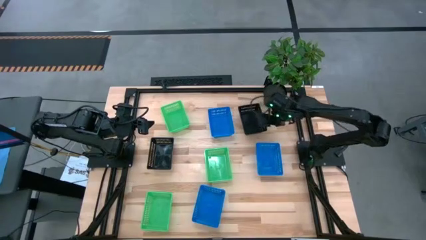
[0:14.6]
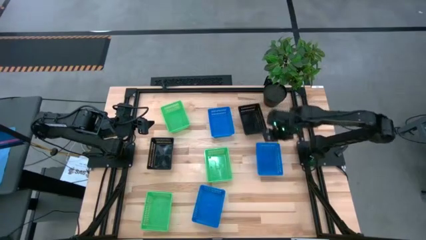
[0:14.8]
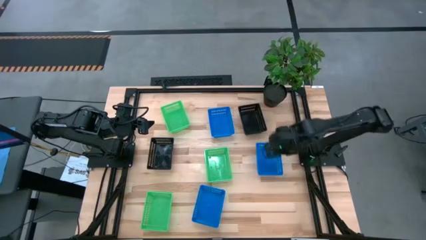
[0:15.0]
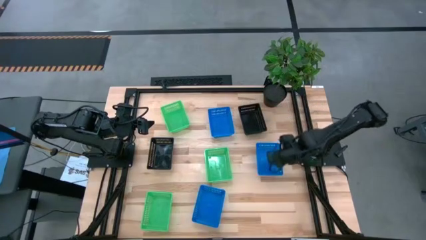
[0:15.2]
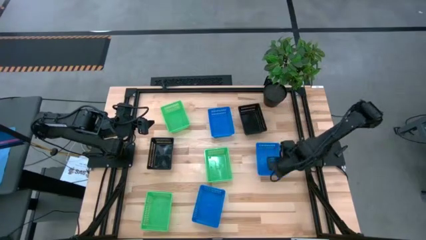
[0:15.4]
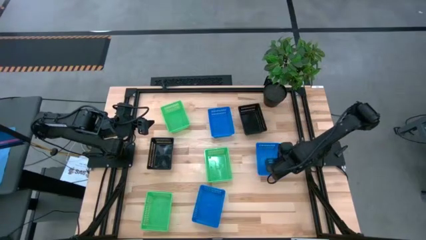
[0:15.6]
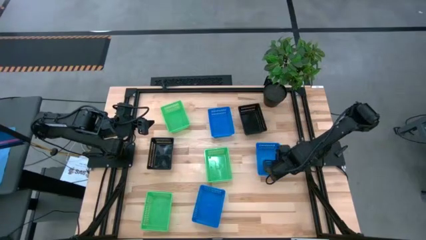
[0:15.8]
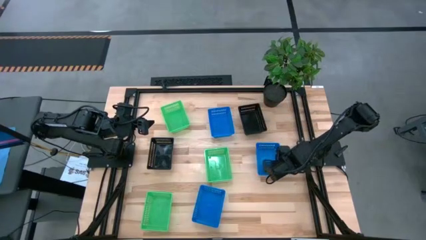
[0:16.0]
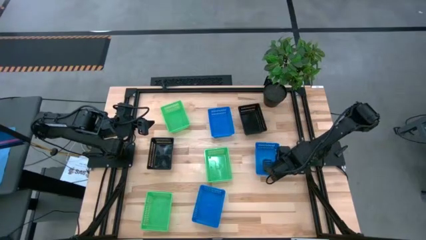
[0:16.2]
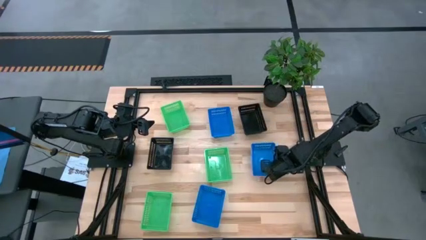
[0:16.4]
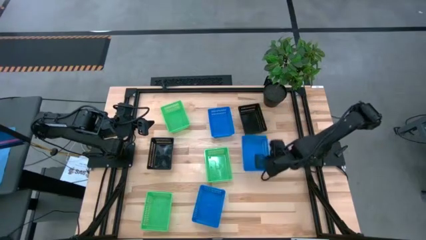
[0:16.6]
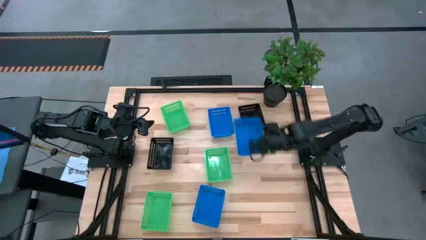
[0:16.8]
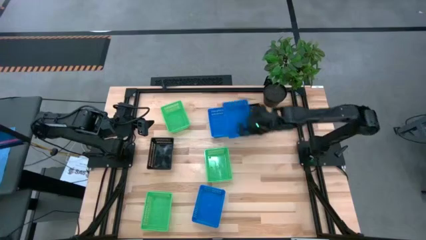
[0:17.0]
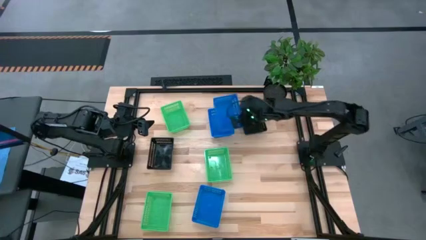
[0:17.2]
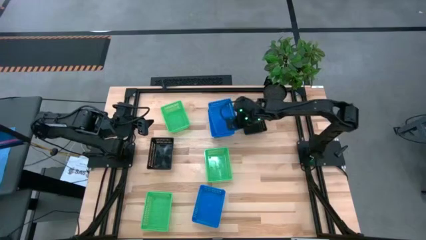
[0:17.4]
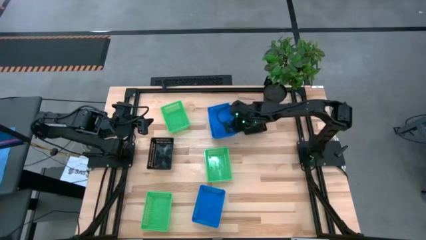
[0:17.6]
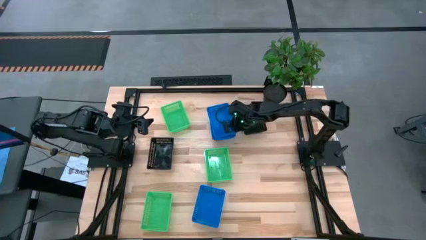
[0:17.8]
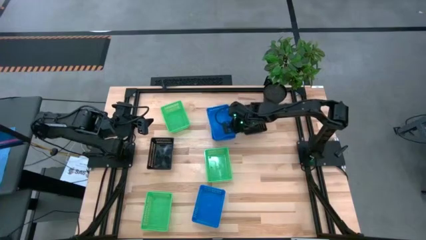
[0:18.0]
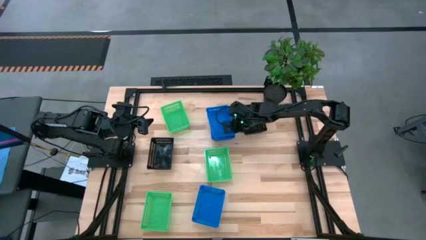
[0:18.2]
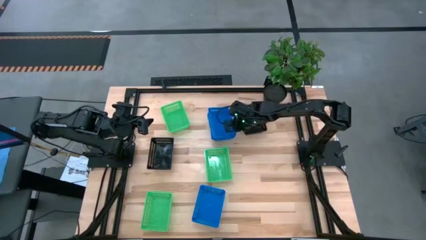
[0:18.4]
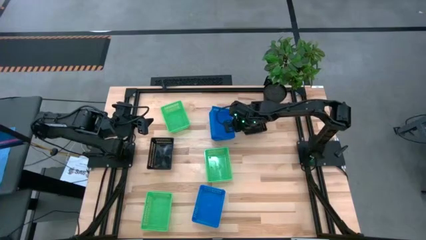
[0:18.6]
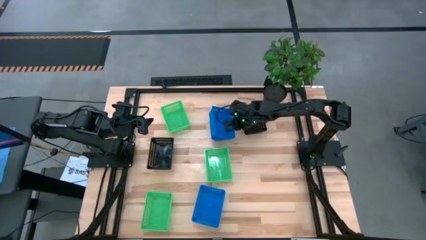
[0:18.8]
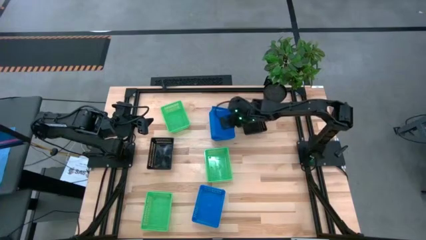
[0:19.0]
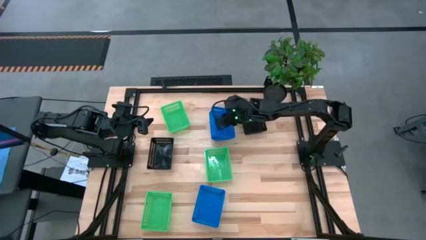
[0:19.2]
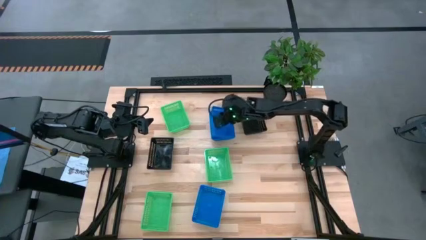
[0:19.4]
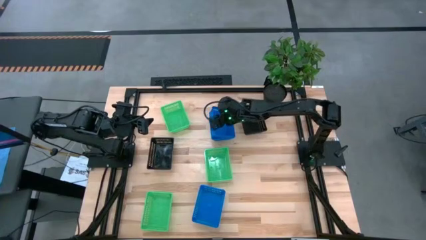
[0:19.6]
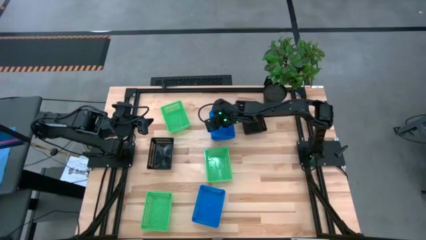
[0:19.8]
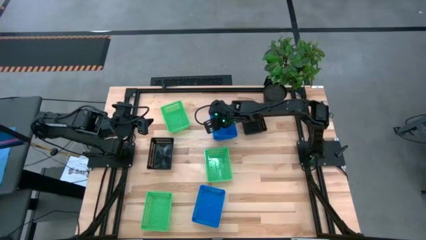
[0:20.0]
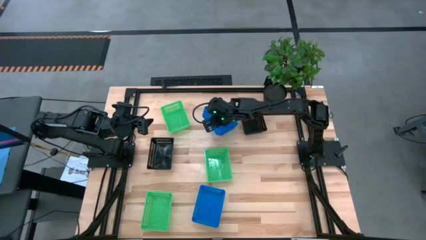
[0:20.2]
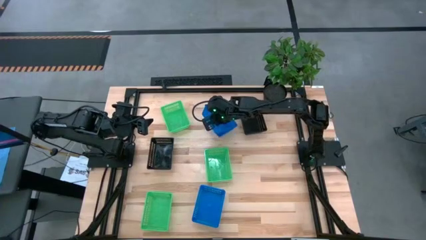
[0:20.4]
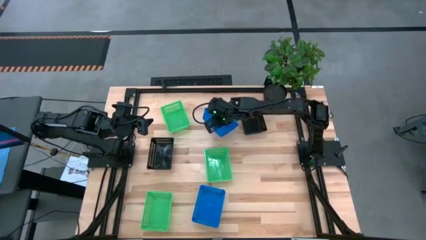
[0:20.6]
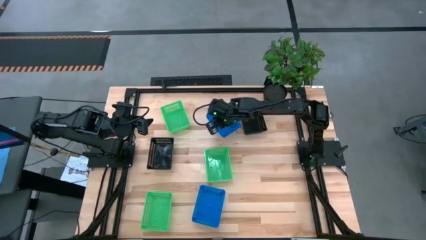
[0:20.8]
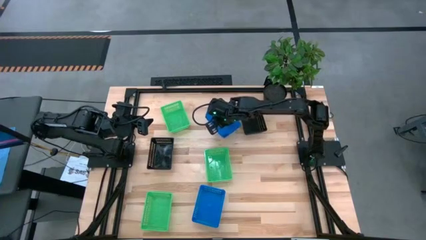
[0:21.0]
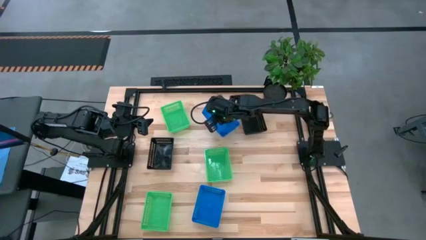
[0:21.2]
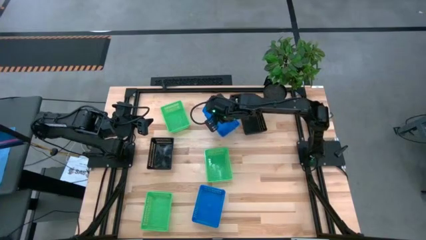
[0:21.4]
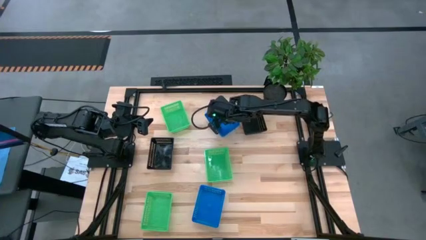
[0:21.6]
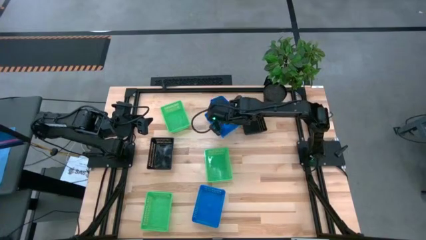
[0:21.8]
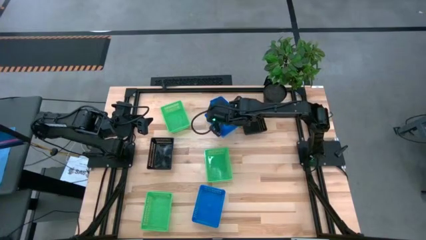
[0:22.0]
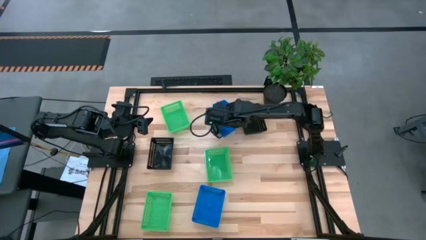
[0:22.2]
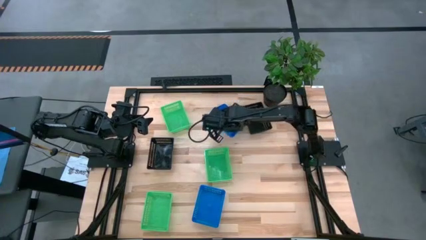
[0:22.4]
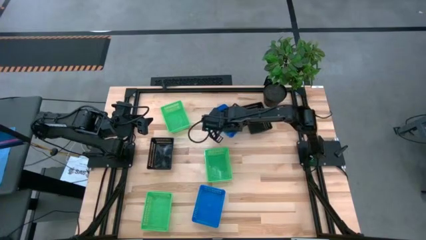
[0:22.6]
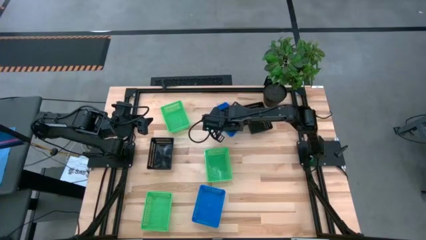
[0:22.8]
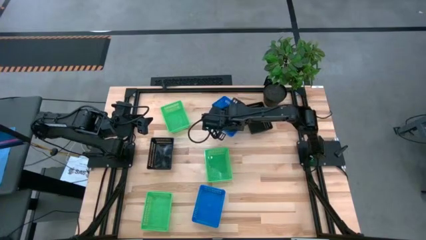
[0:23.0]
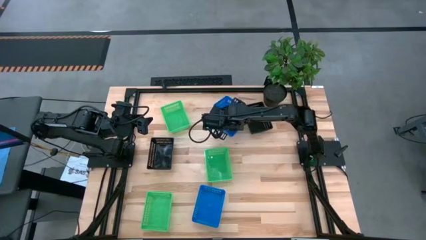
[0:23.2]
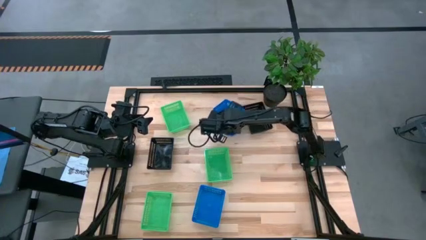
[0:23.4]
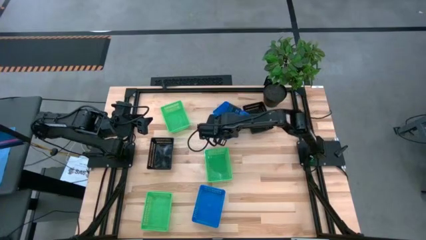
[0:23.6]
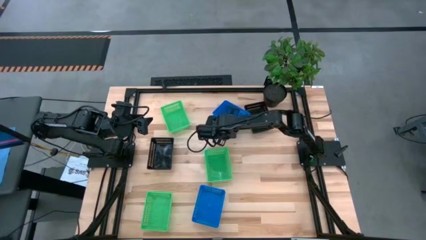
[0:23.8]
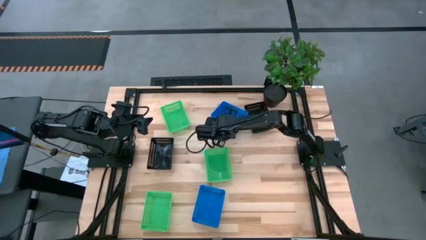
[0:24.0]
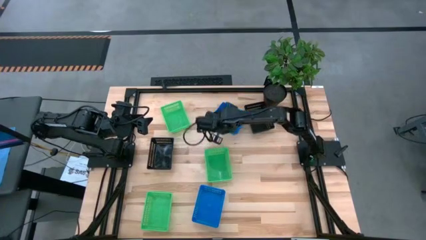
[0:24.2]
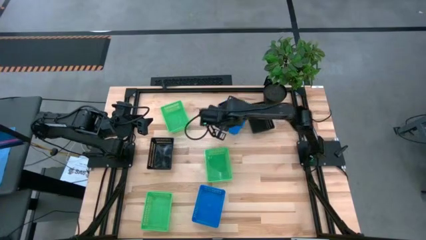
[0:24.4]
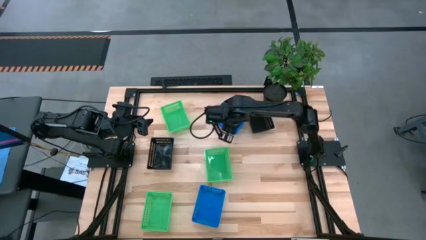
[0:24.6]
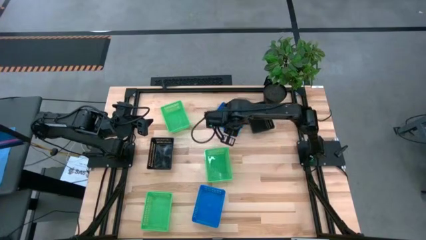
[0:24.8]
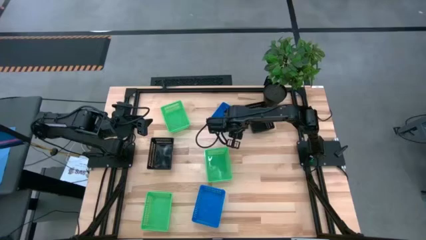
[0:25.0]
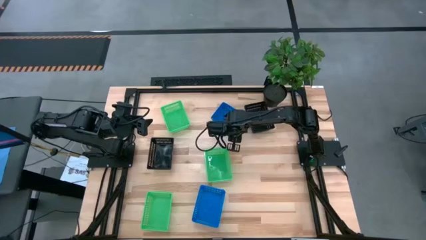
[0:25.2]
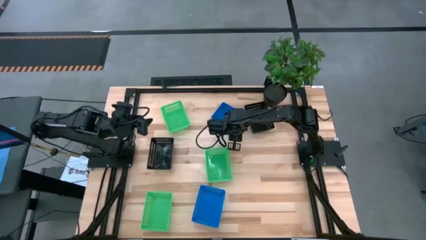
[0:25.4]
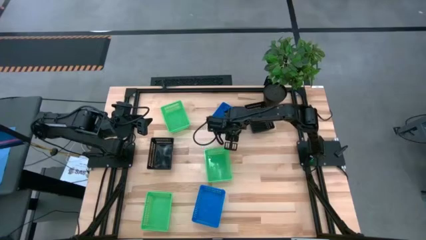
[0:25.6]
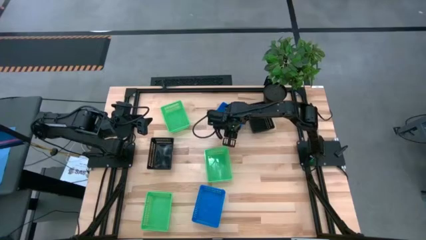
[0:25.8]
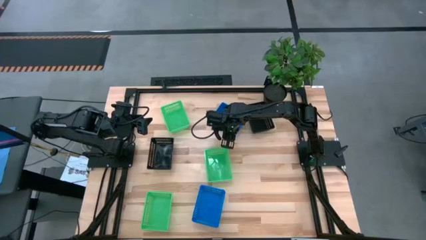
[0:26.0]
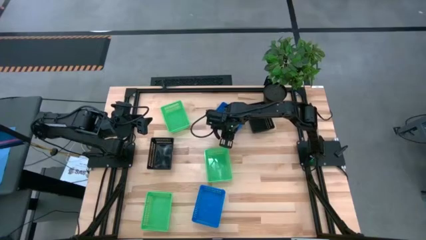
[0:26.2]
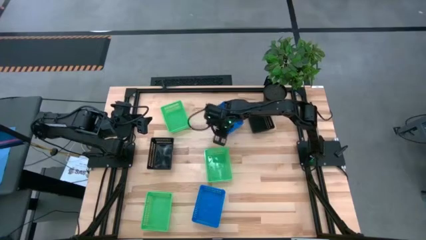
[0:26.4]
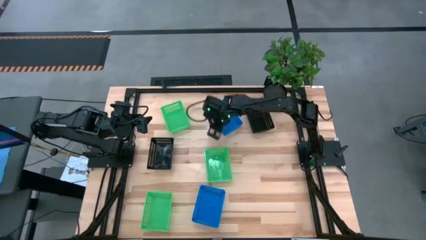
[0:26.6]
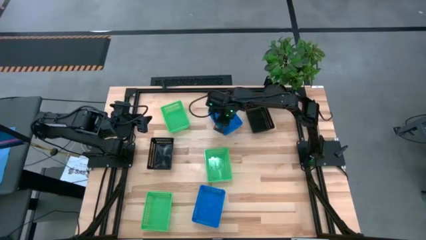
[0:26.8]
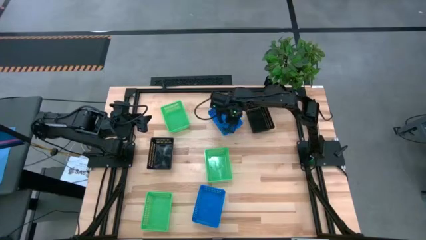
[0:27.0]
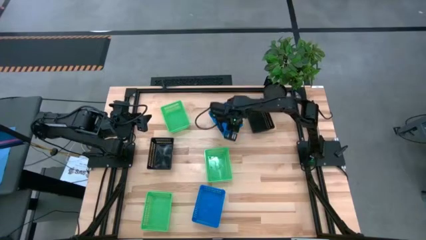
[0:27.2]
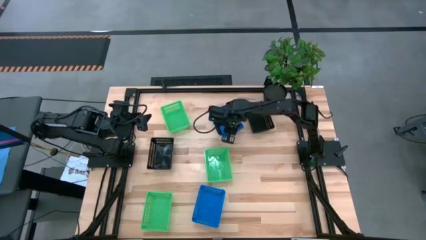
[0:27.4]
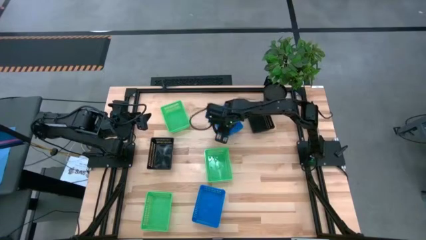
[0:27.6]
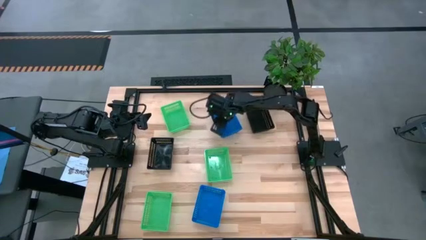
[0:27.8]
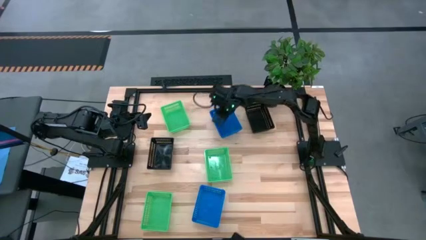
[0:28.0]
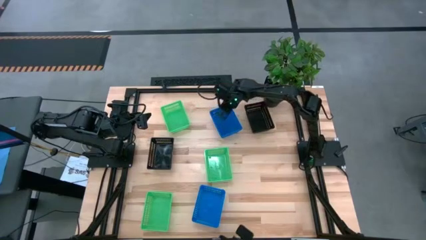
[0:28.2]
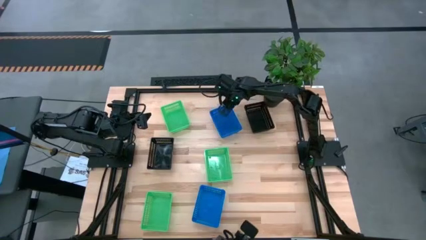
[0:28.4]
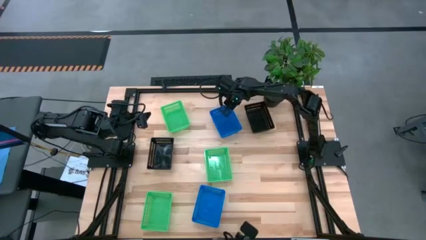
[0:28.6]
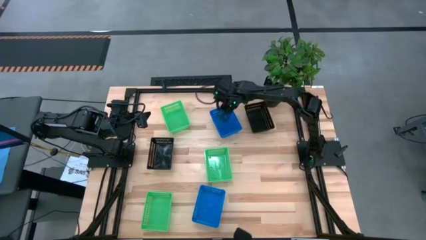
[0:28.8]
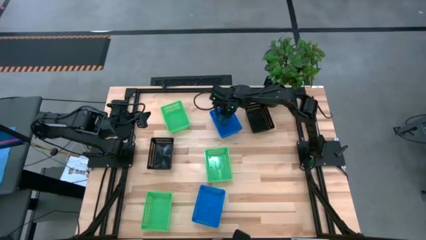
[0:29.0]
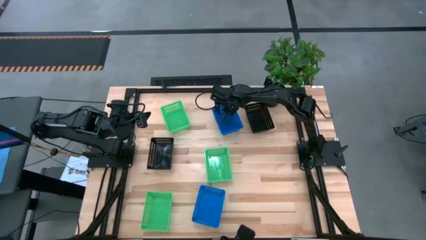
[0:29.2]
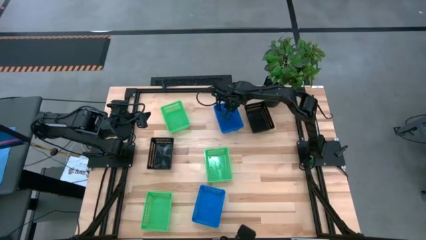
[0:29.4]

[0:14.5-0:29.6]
Stack the middle blue bin on top of the top blue bin
